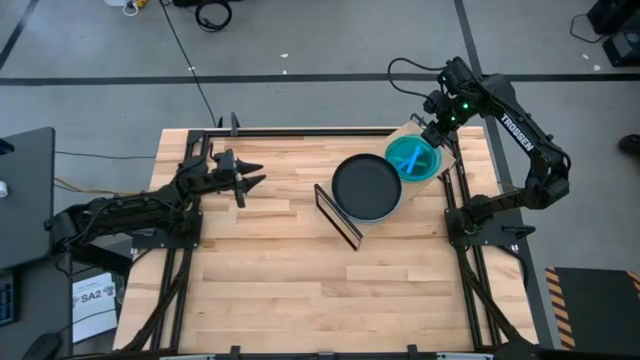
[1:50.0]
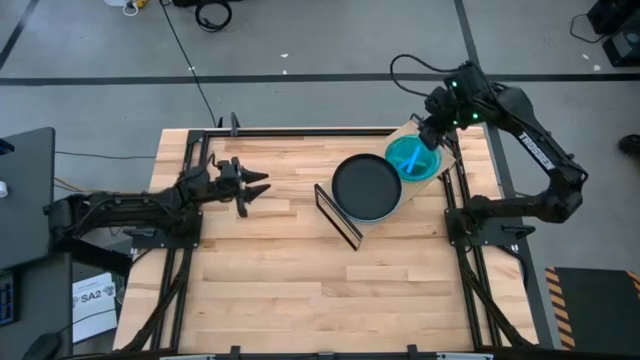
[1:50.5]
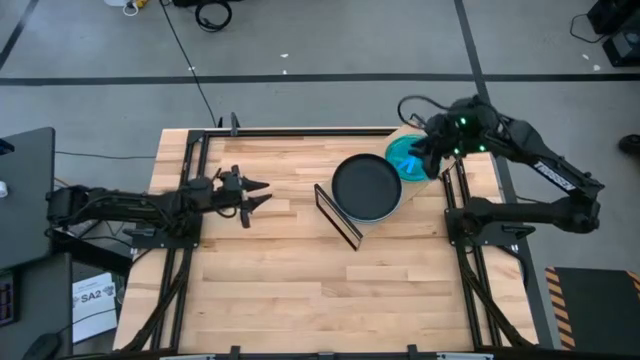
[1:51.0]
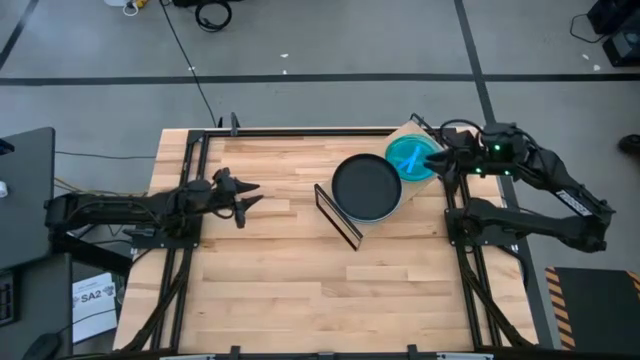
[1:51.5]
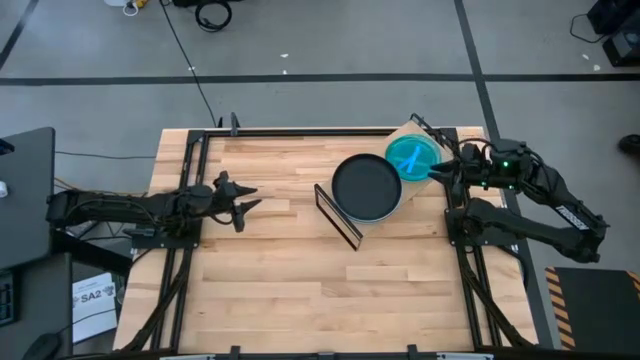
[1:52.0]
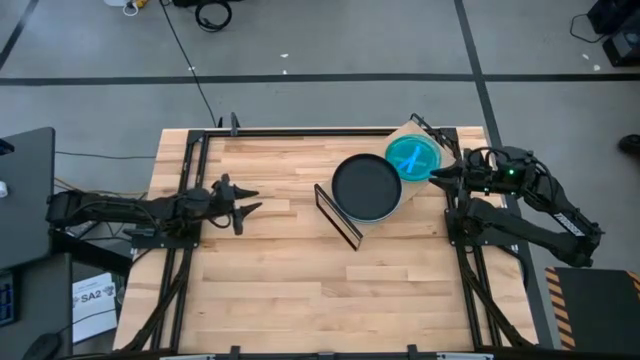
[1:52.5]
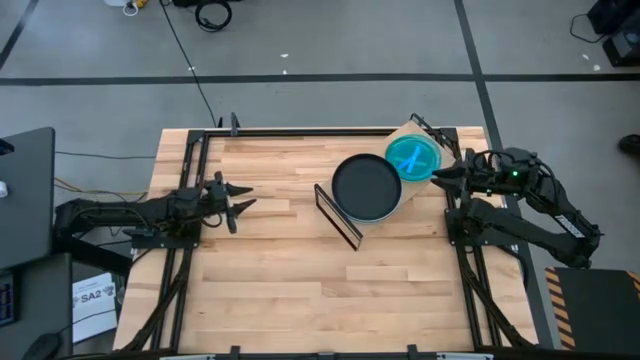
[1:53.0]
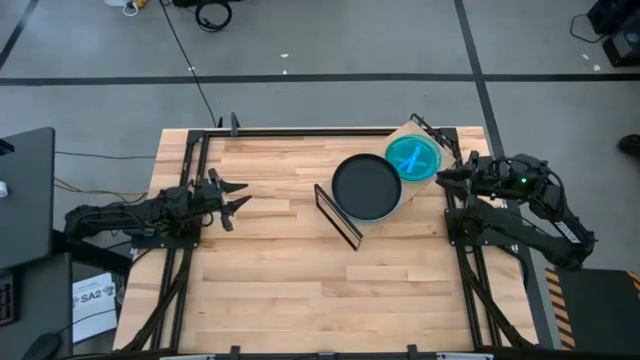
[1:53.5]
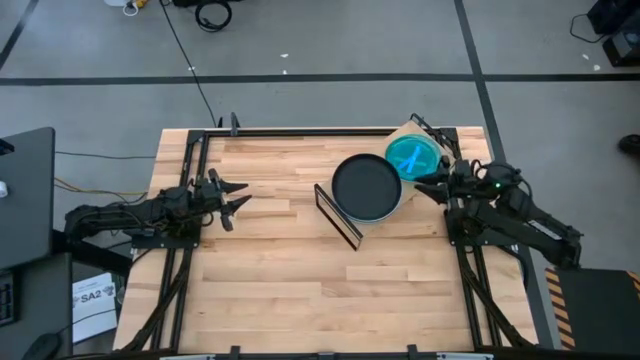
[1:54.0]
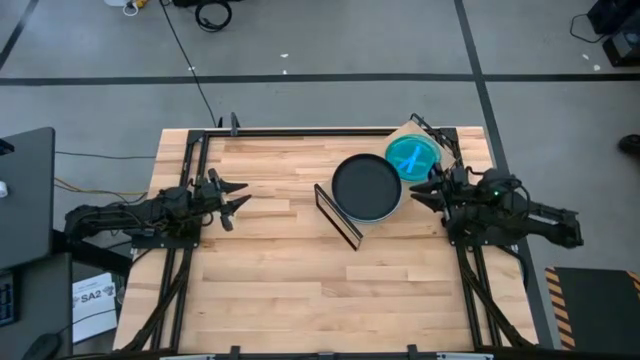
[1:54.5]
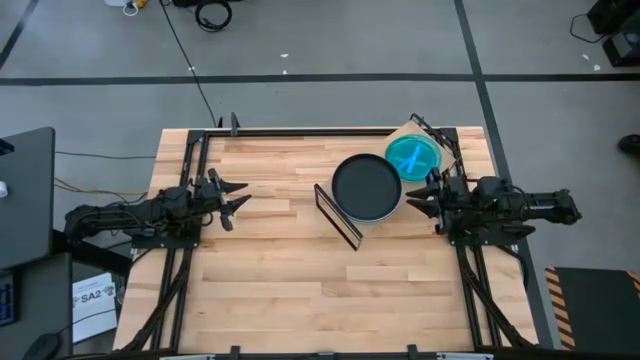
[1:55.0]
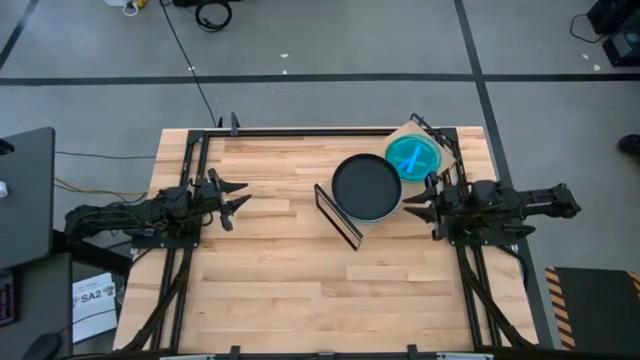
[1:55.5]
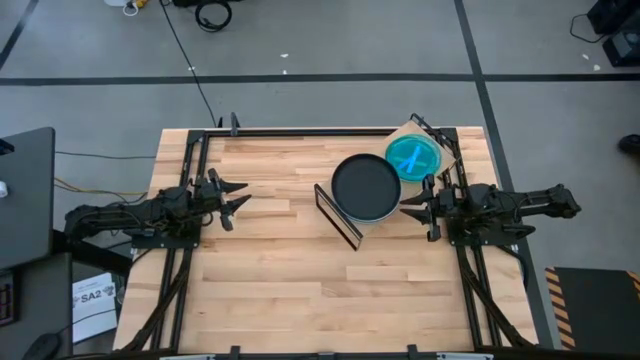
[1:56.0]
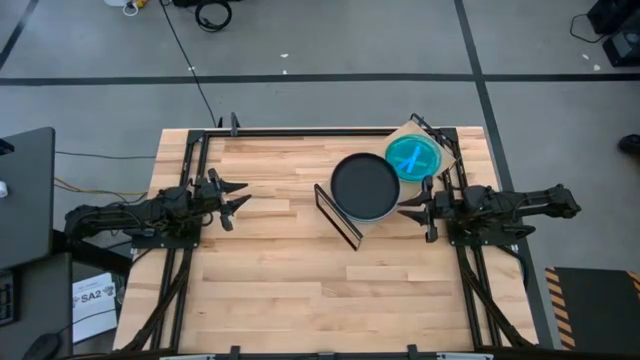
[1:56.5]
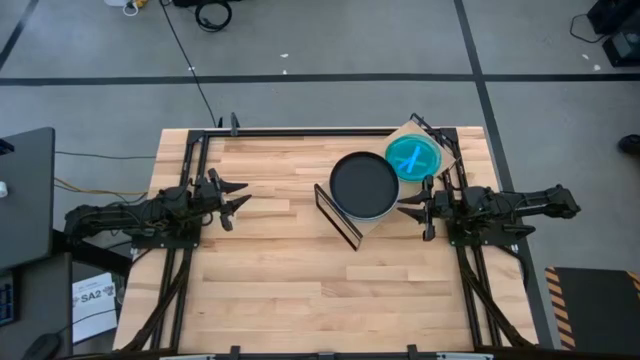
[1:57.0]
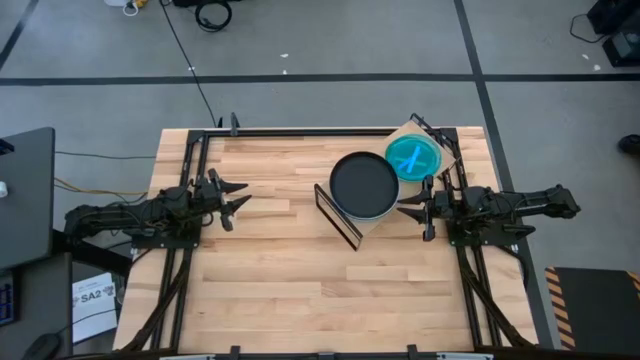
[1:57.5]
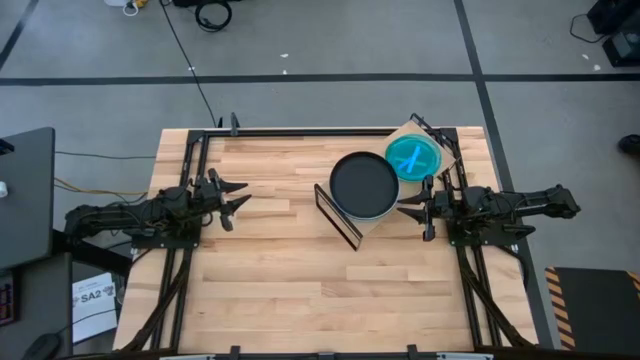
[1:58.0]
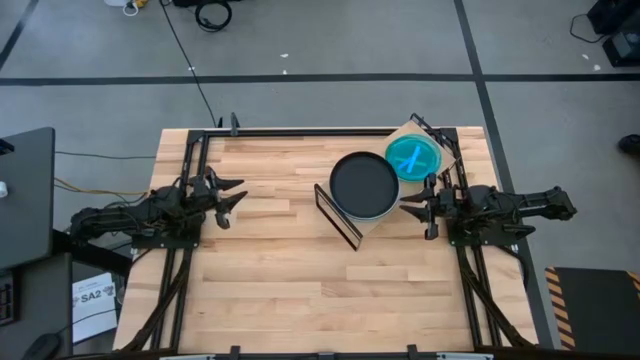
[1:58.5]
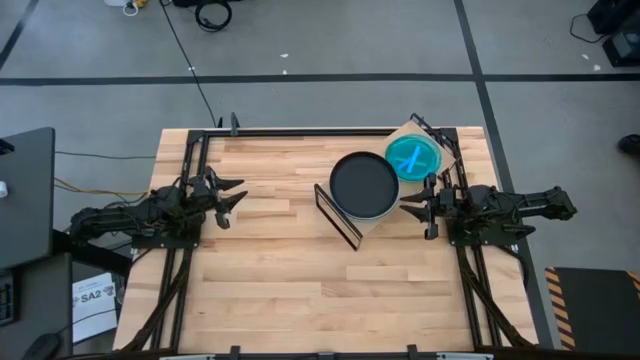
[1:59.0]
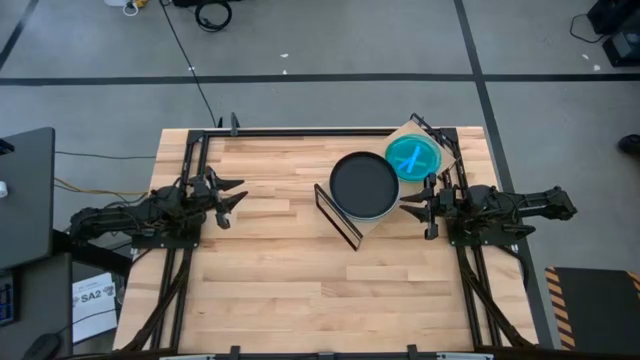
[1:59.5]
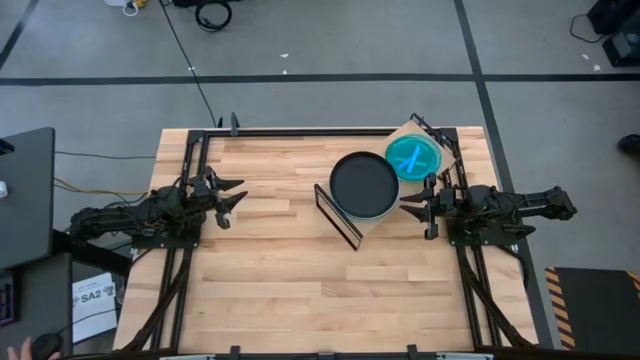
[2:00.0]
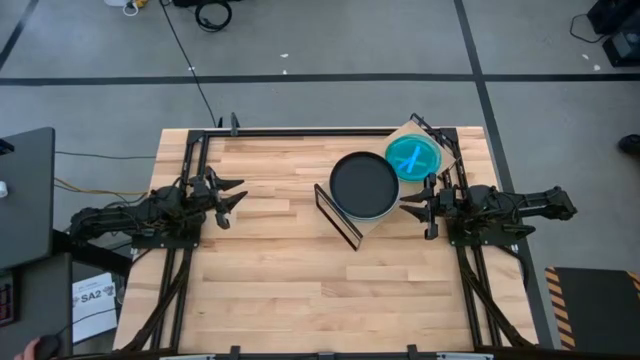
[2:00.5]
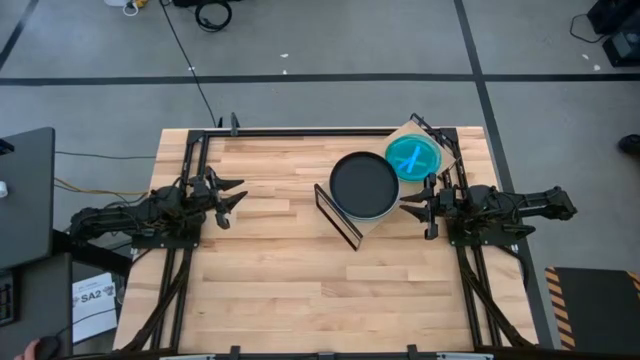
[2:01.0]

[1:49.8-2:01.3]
Task: Place and stack plates onto a shelf
Return to Home Position

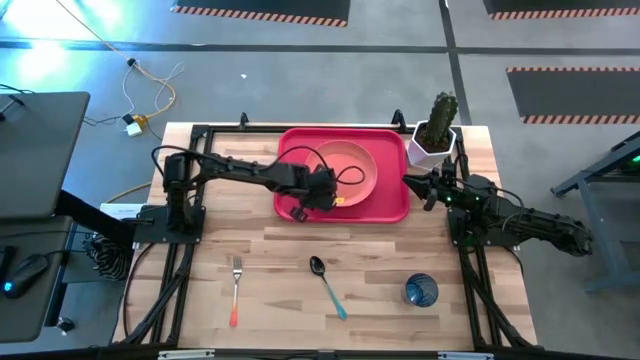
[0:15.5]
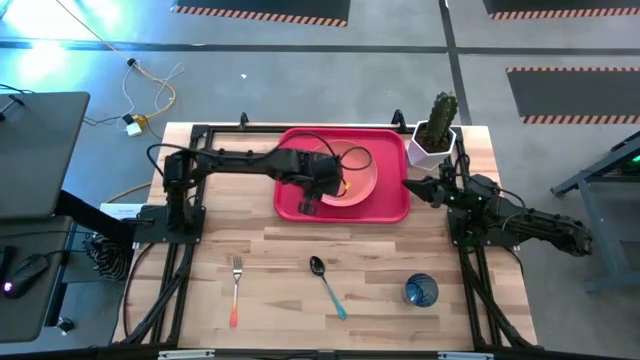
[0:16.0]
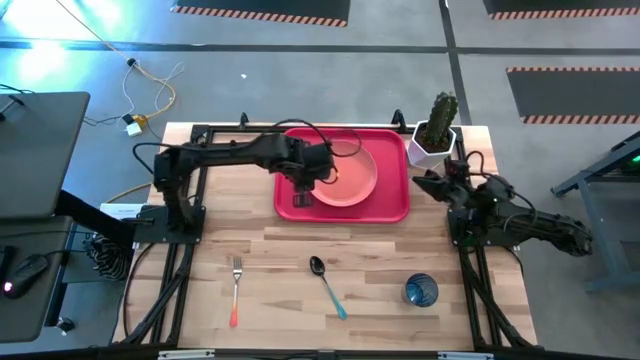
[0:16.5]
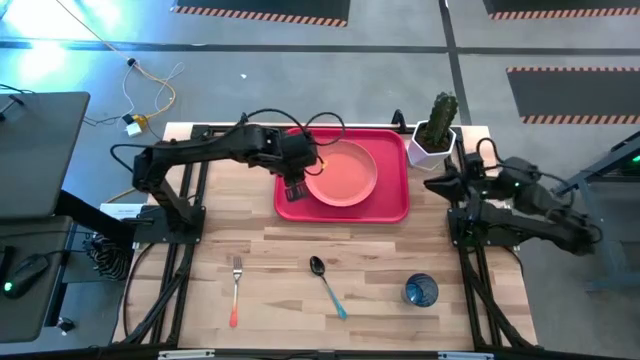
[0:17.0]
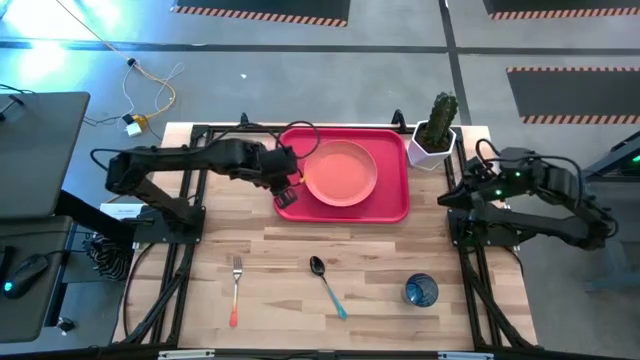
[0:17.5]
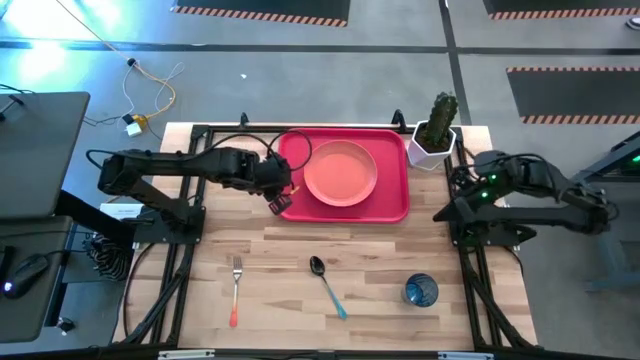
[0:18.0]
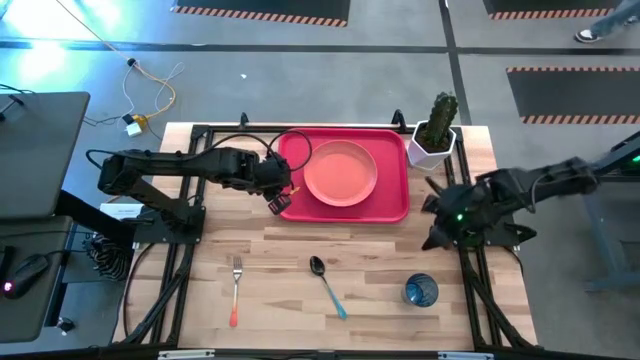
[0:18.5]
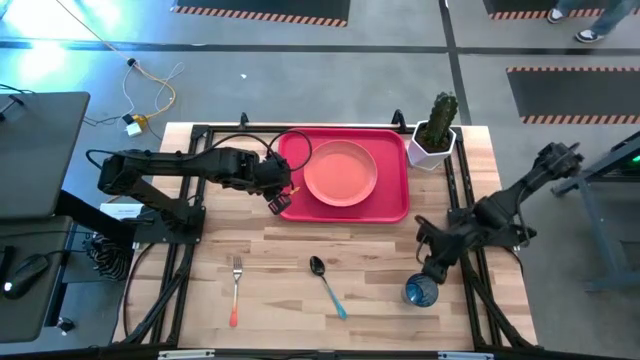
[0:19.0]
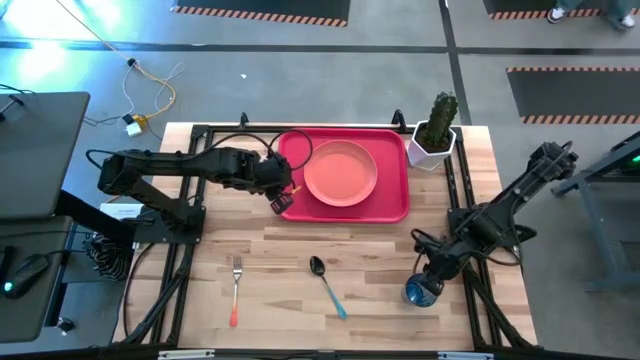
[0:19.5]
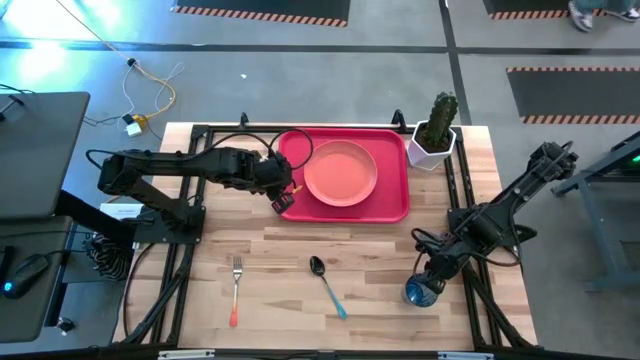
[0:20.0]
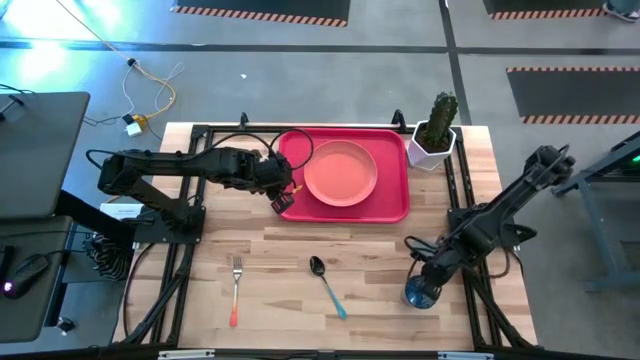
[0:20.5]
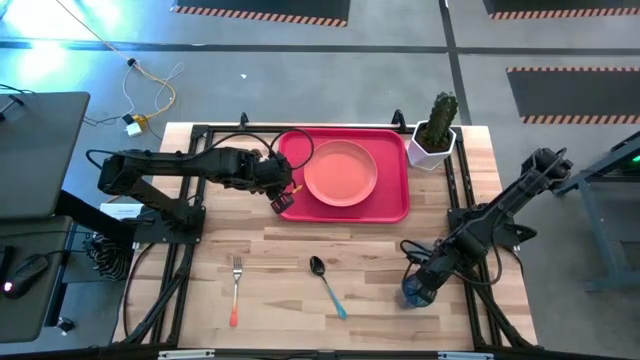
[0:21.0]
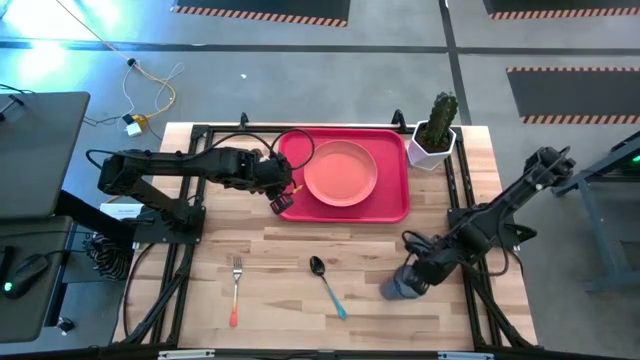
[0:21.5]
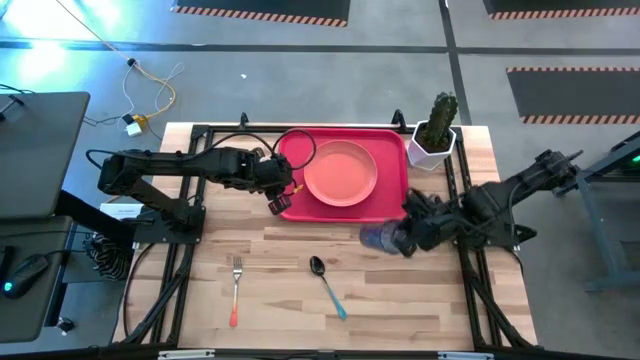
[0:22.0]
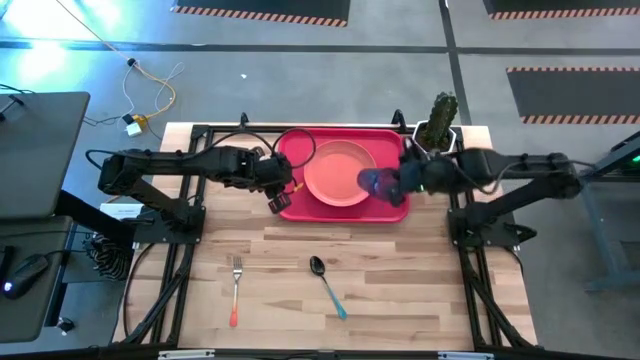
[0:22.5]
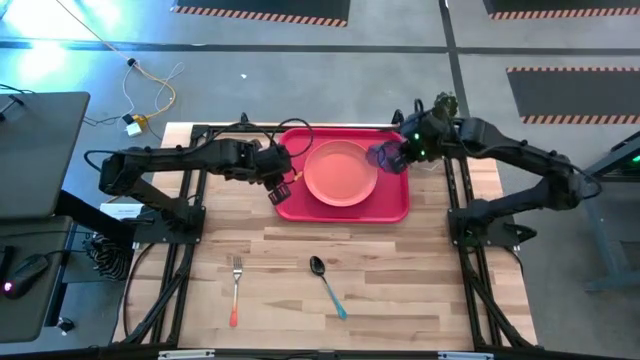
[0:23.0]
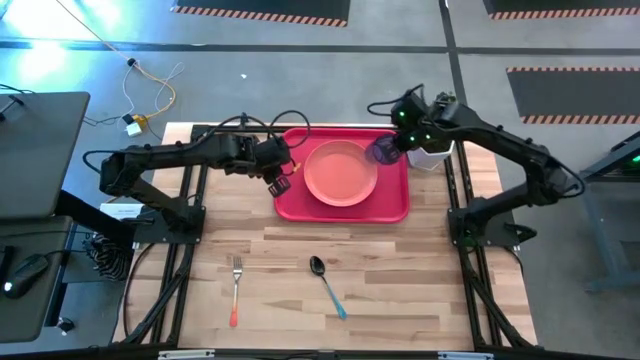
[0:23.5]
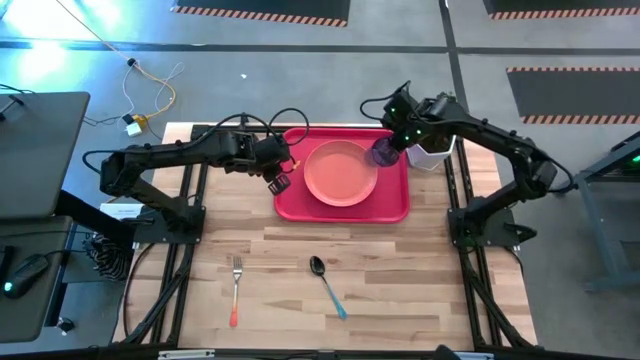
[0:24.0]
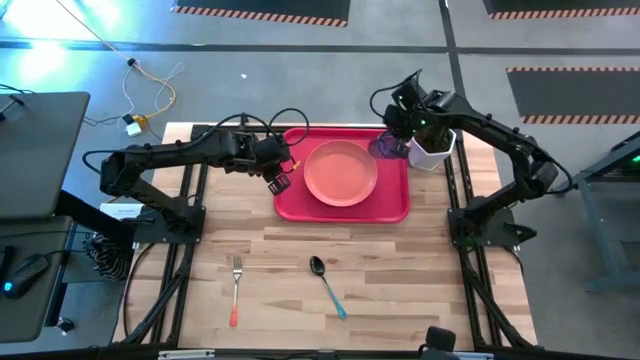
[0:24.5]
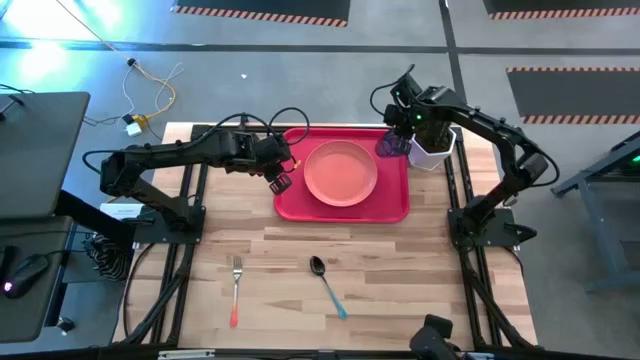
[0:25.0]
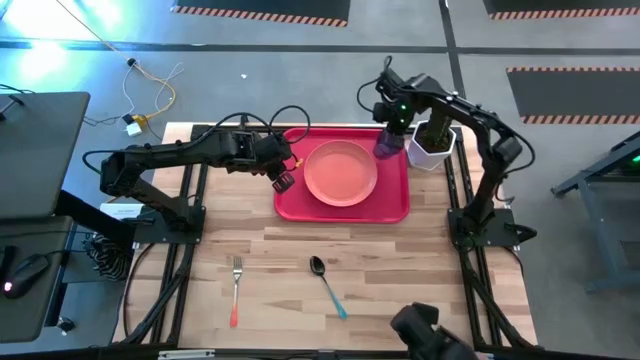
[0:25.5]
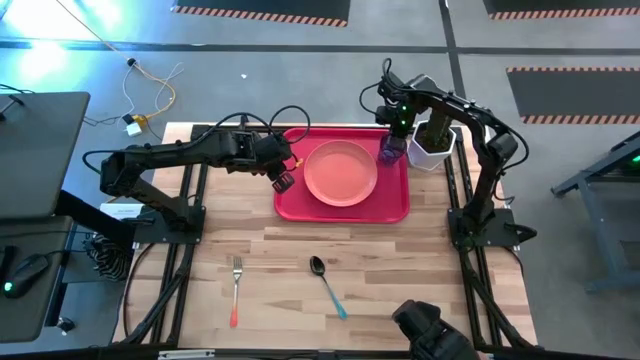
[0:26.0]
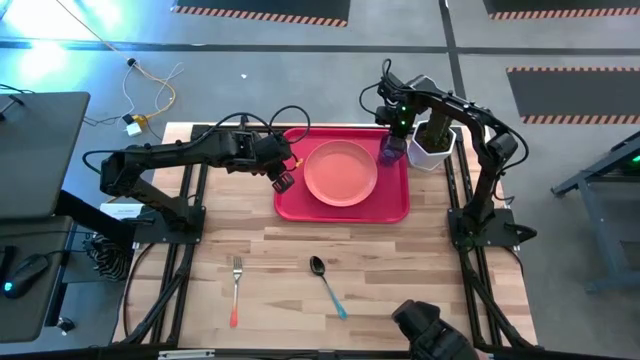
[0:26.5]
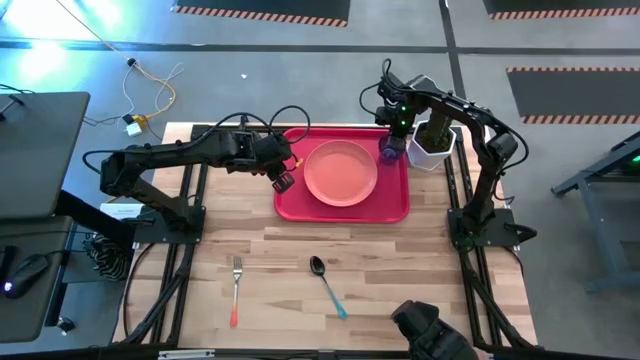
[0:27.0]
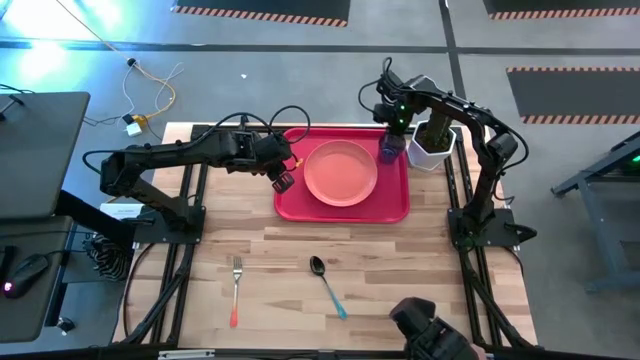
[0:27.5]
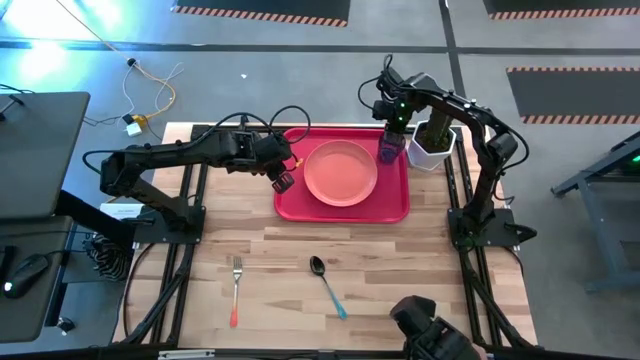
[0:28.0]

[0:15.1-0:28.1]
Task: Pick and place plate/cup/fork/spoon on tray
Put the blue cup on the orange tray on the top right of the orange plate
